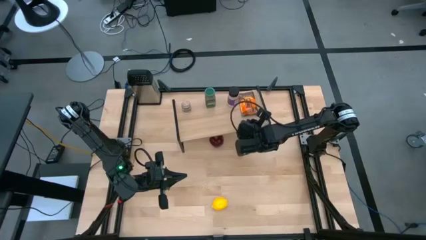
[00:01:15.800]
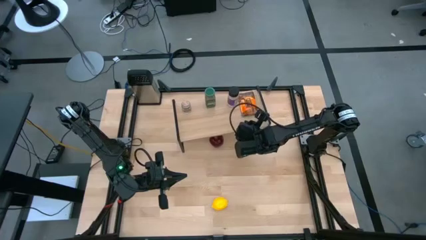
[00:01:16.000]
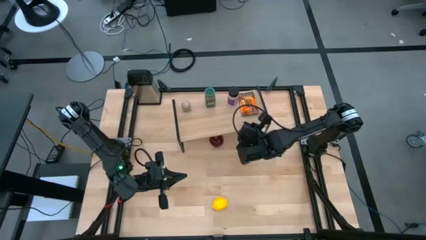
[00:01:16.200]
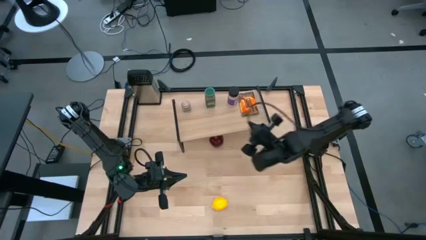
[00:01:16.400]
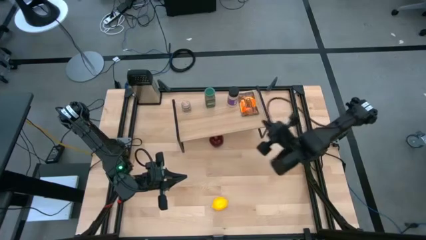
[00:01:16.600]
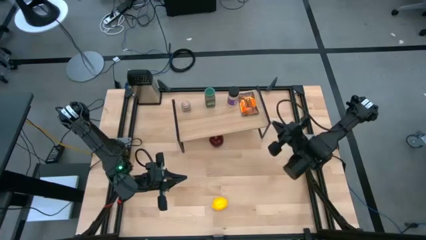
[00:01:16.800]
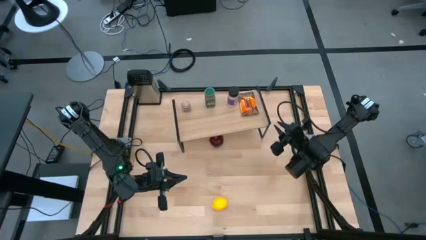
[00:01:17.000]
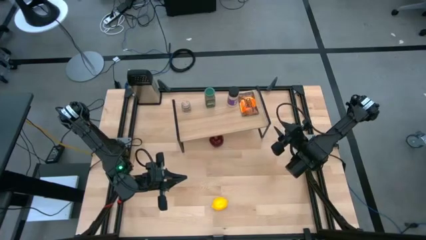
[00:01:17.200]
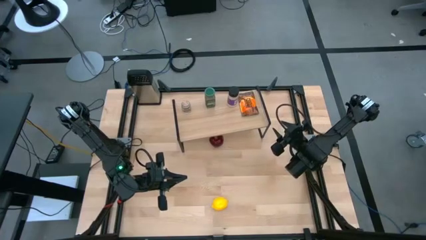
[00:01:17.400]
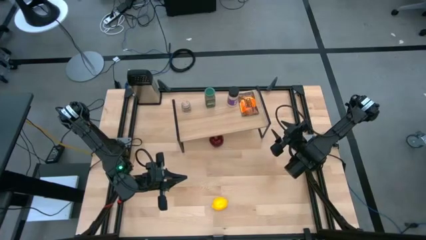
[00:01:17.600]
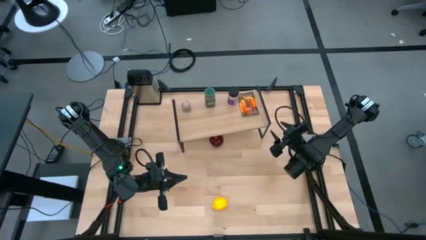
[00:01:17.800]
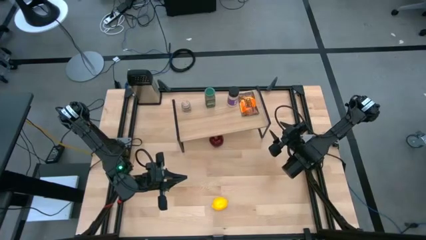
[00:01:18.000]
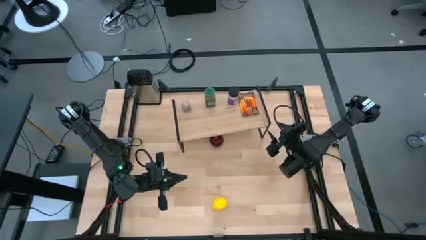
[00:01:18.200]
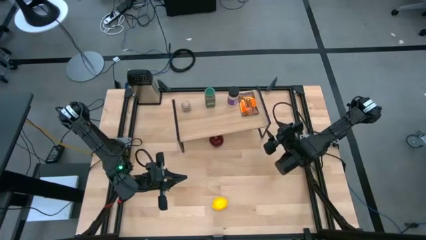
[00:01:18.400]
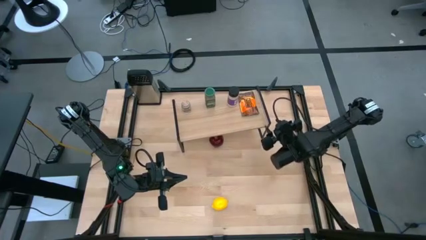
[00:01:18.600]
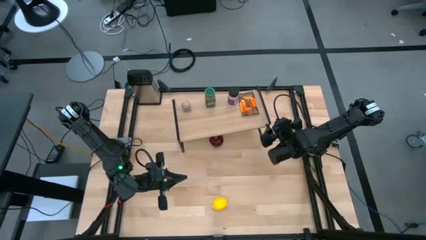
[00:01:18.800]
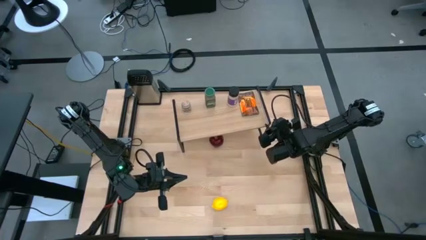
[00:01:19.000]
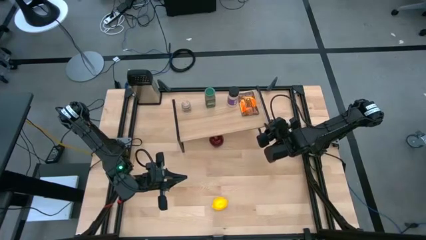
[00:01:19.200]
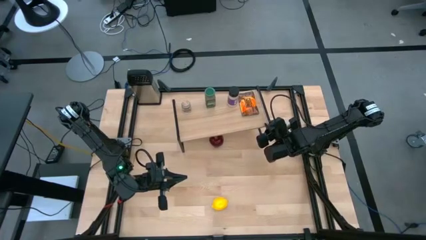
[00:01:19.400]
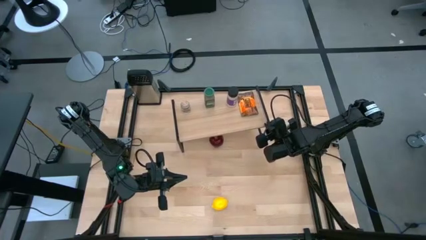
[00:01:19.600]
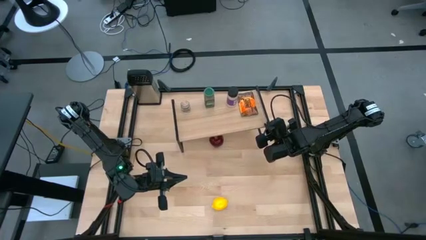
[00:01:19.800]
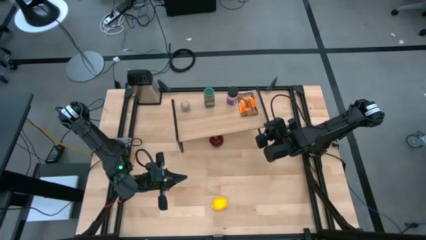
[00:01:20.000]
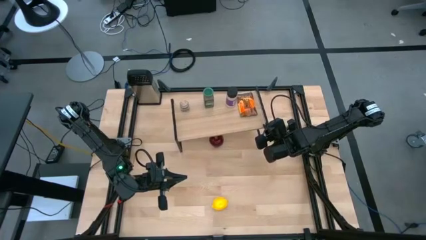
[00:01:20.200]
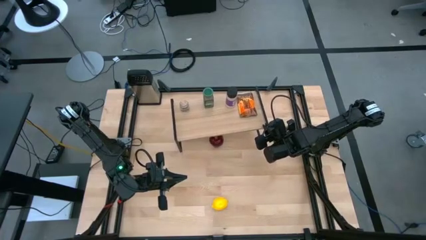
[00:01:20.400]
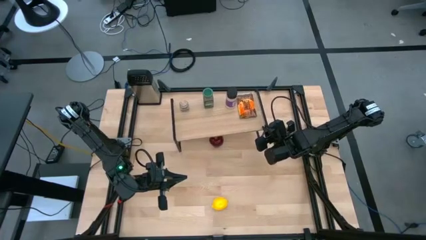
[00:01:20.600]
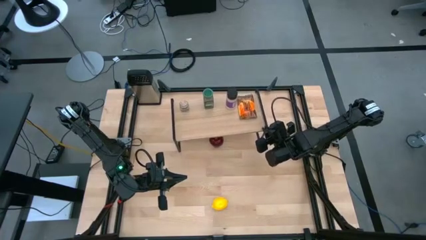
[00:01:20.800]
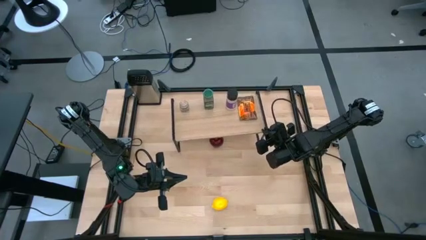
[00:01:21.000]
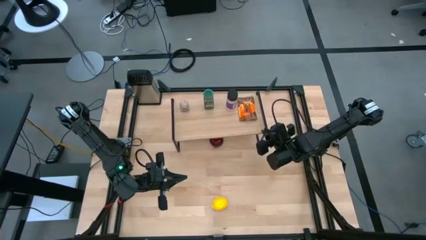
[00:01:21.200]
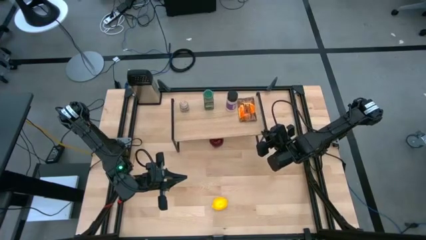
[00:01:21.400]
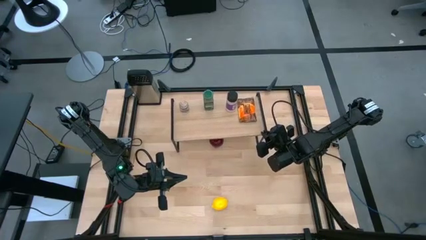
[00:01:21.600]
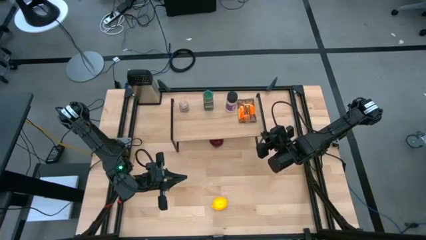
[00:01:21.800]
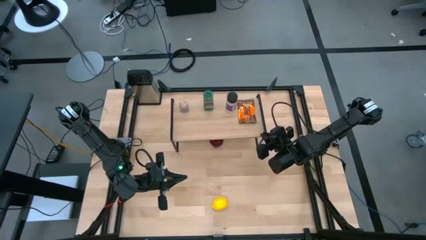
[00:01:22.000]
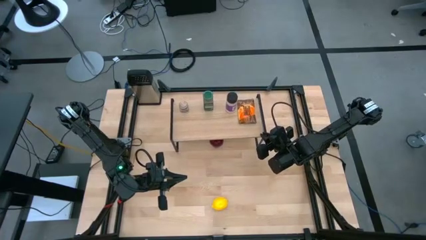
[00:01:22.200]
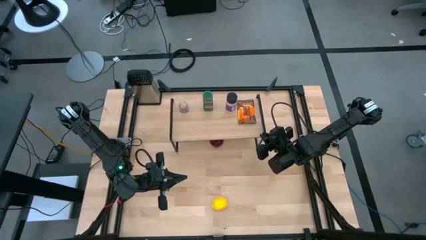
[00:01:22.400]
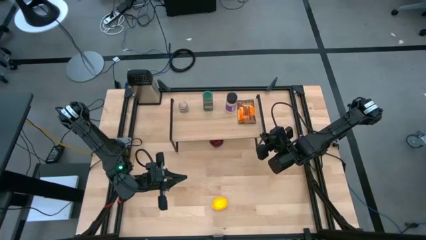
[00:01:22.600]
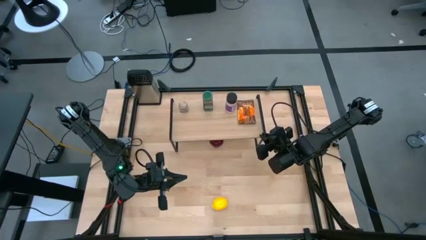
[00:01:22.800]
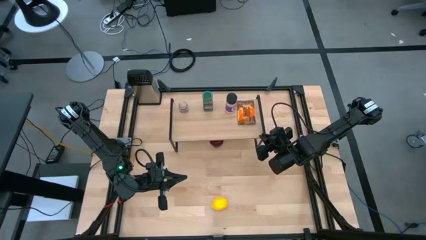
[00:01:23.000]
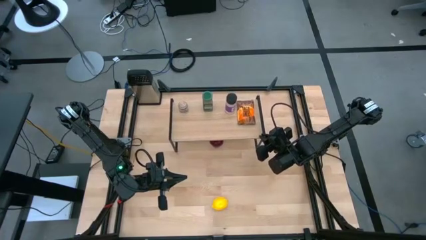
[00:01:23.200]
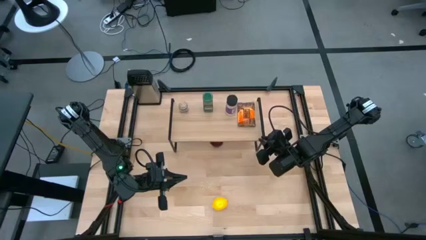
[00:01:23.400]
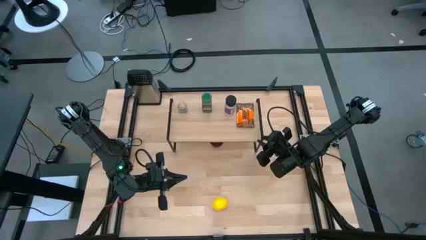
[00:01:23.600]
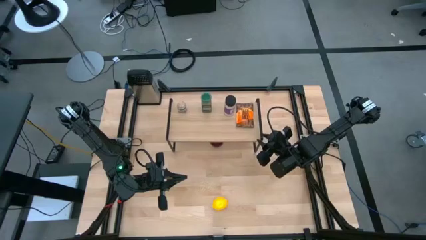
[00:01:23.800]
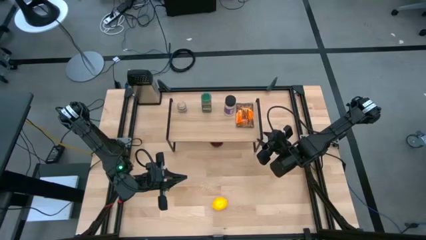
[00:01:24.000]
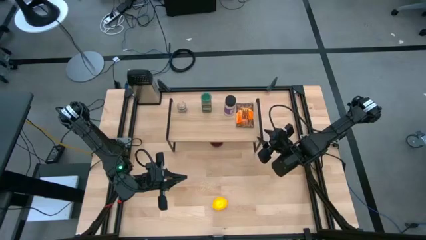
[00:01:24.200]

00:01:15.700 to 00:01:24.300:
Task: Shelf spices
Adjust the shelf

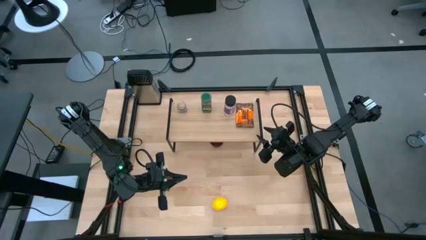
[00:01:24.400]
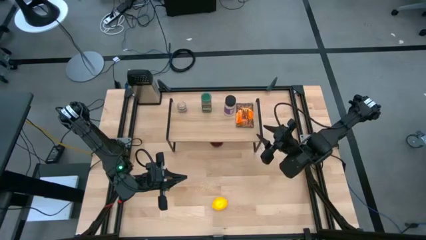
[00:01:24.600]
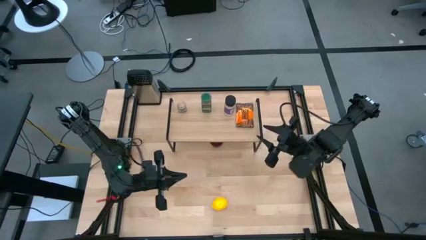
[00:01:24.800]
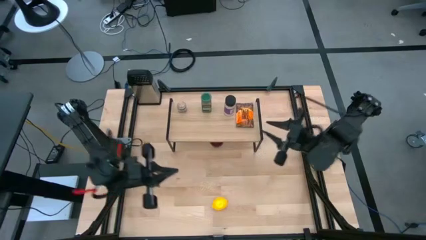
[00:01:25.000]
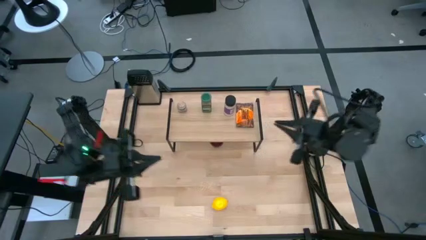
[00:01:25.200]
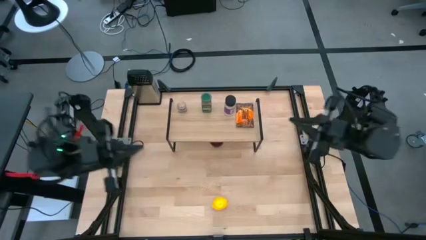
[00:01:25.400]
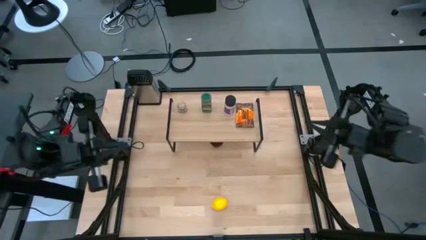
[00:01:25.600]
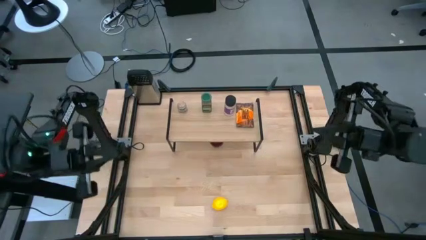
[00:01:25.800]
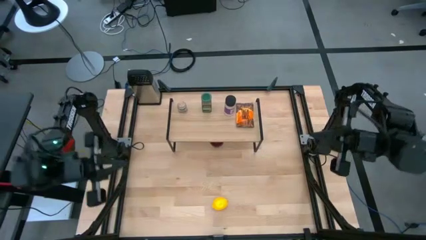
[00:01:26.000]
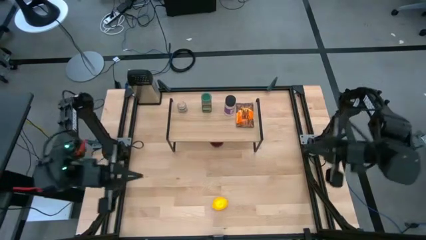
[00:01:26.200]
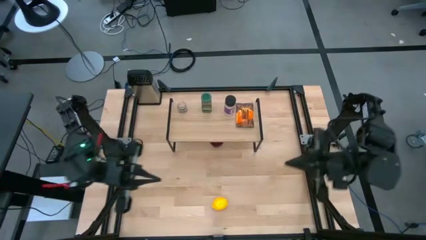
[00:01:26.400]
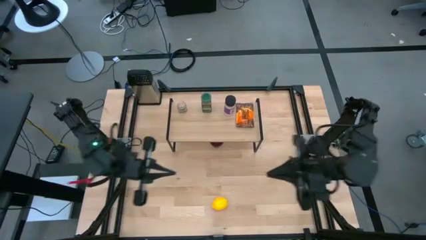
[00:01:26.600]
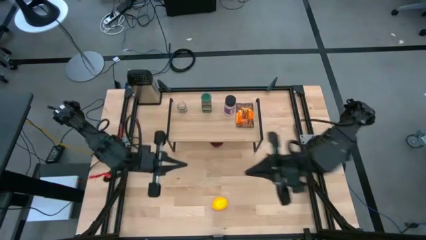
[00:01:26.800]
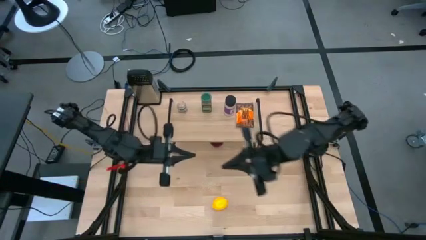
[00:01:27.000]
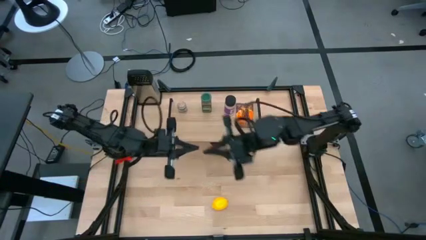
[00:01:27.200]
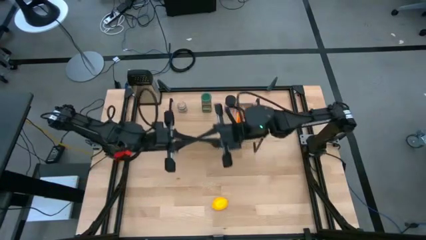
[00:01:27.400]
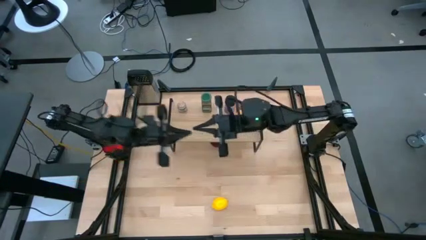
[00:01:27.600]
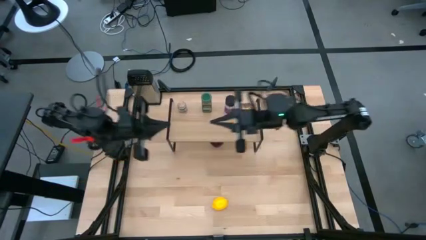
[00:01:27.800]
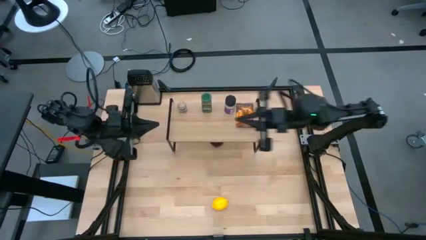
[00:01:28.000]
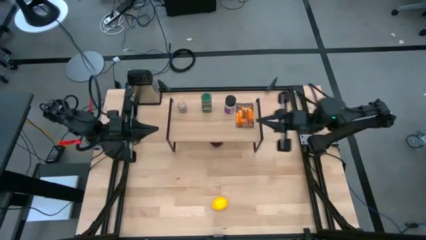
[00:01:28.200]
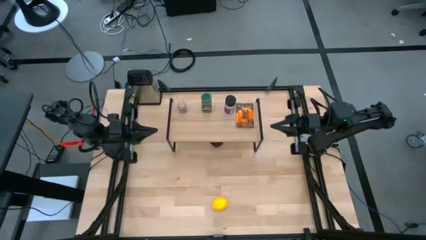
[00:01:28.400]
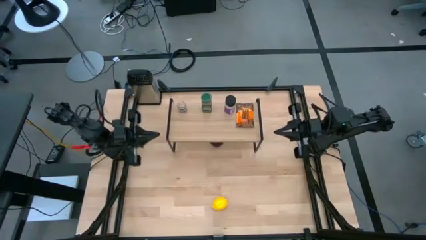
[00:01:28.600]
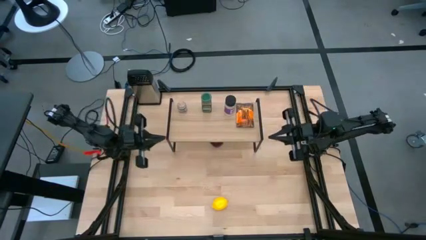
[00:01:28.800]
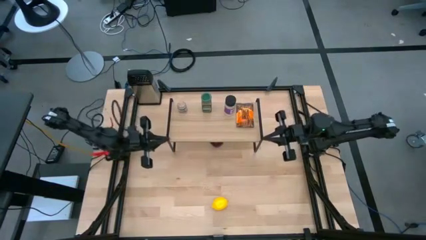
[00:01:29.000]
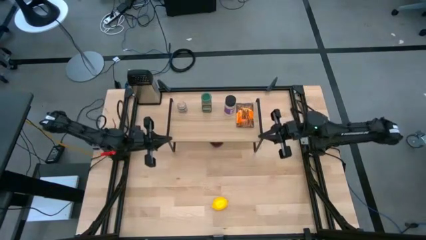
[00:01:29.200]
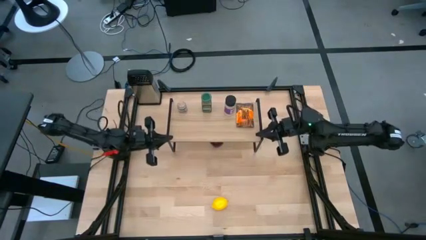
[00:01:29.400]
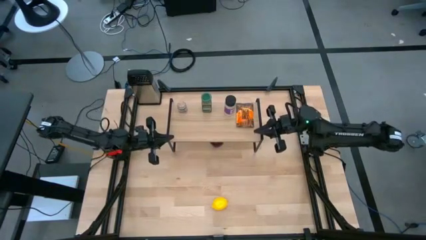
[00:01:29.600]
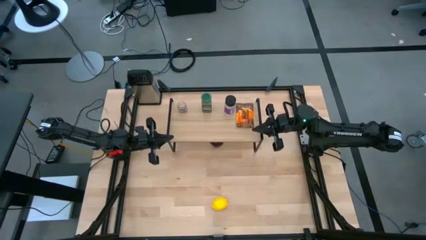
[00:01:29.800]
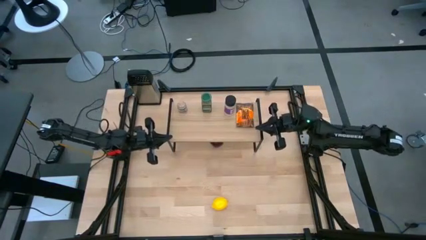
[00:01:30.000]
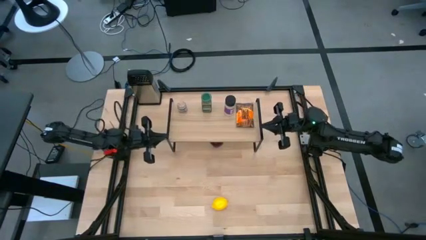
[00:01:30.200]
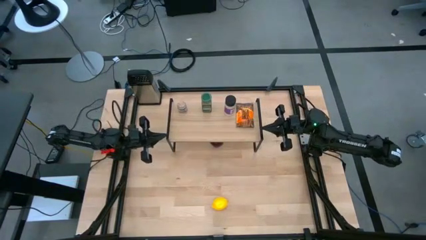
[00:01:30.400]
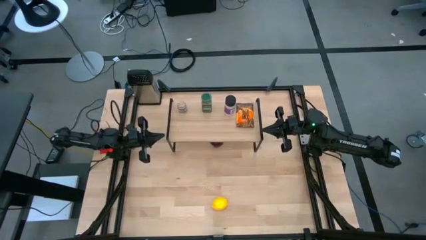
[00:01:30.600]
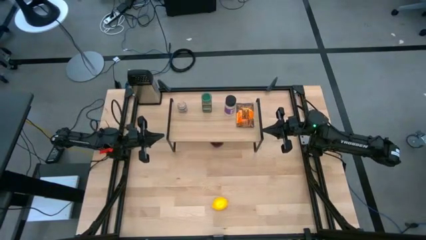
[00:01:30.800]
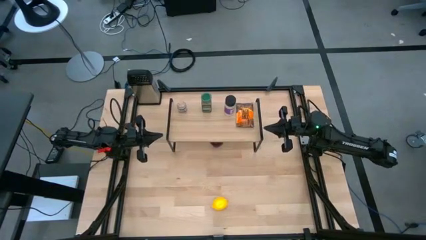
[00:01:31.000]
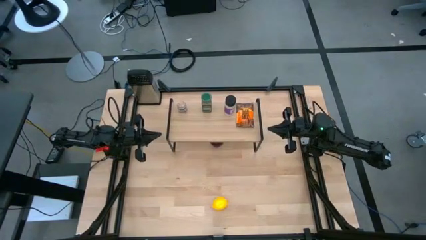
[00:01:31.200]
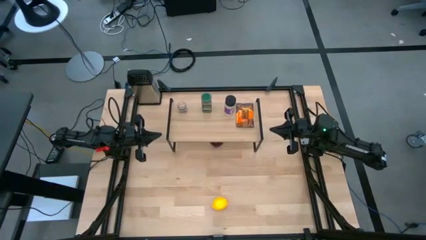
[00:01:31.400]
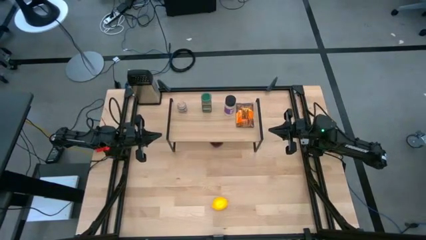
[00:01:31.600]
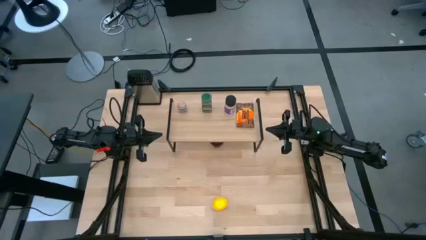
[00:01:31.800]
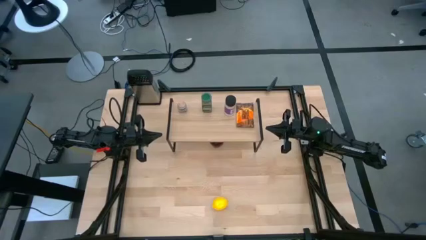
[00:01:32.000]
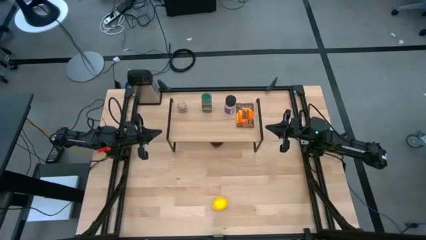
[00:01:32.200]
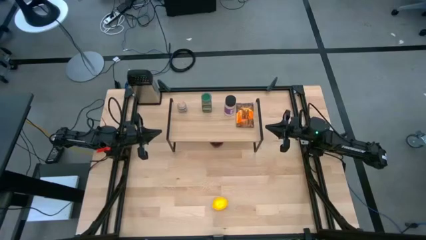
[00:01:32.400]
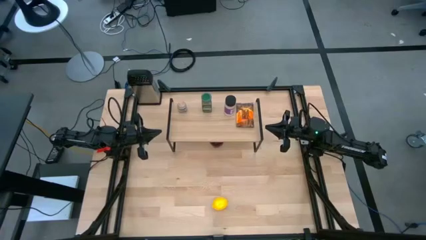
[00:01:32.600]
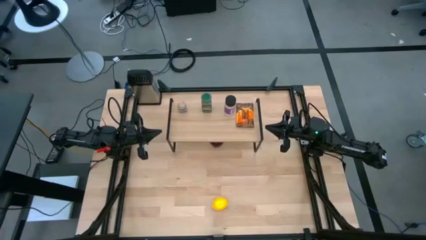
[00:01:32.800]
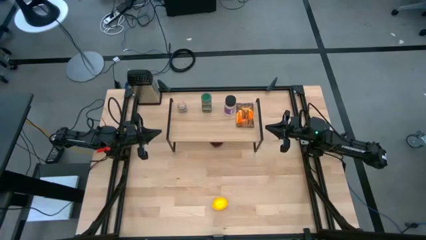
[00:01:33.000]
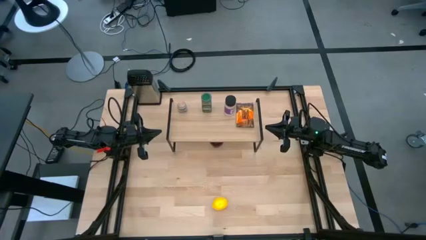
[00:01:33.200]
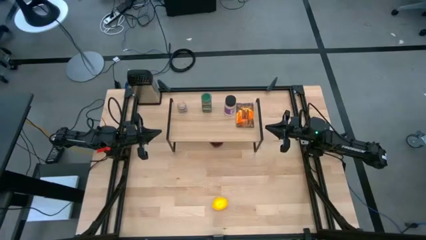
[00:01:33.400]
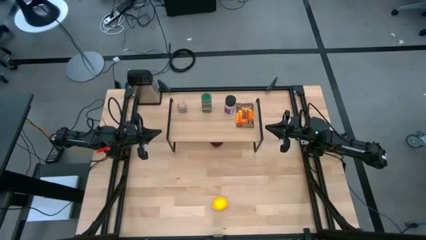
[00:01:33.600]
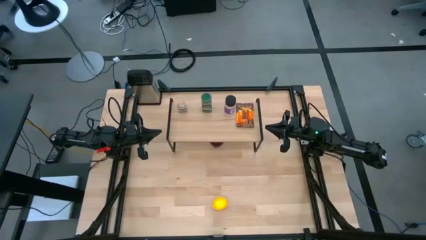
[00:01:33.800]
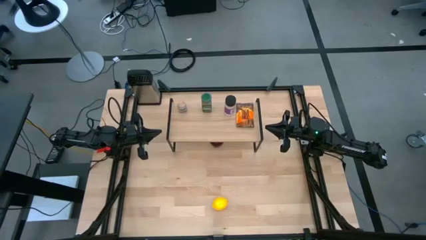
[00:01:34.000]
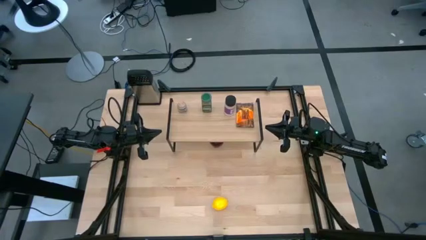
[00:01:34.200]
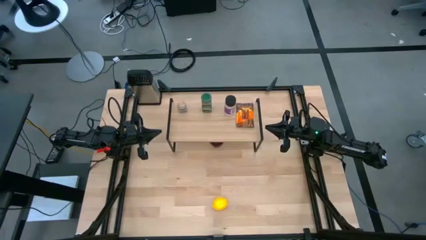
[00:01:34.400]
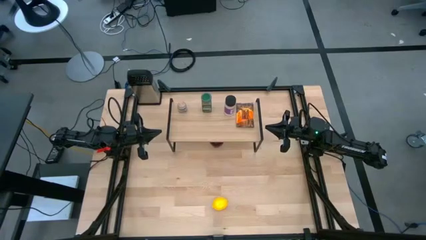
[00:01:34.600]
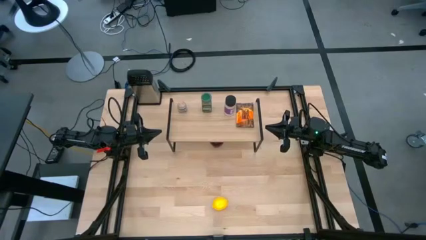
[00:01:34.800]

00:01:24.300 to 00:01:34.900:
Return to Home Position
